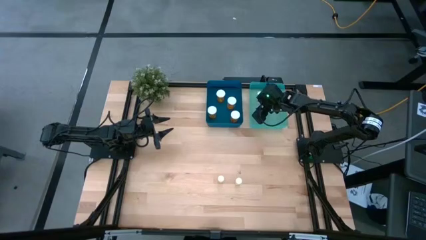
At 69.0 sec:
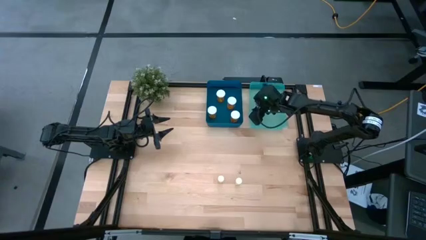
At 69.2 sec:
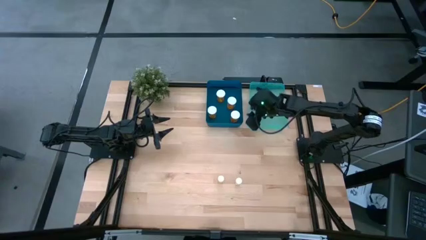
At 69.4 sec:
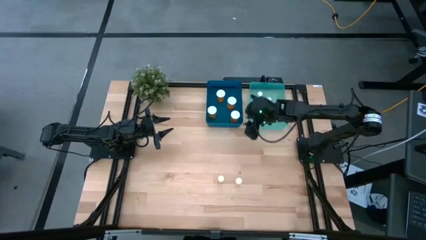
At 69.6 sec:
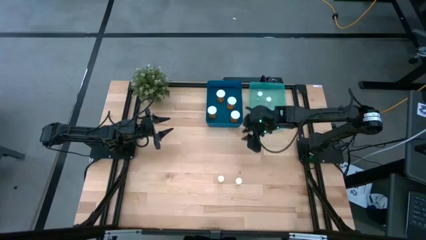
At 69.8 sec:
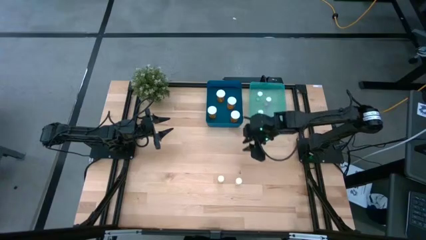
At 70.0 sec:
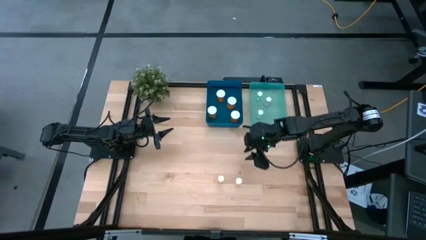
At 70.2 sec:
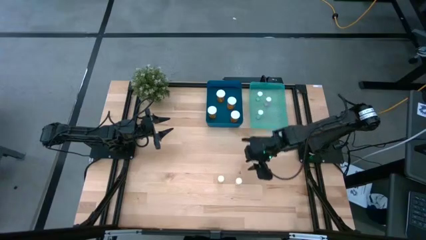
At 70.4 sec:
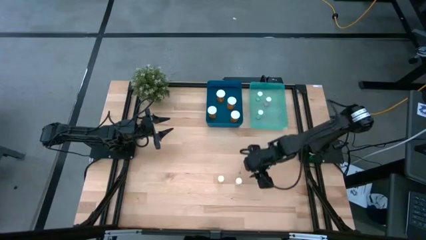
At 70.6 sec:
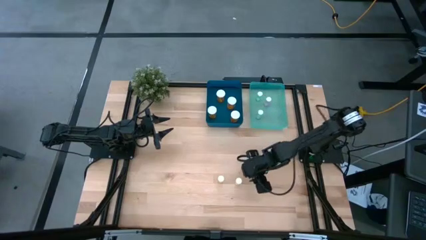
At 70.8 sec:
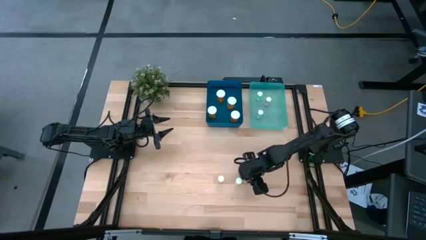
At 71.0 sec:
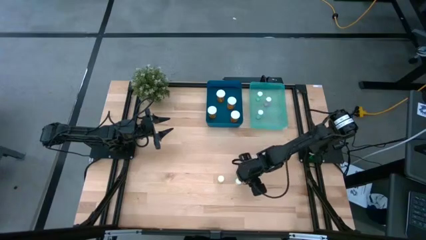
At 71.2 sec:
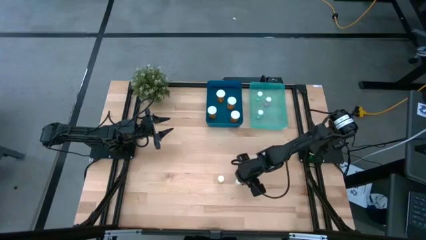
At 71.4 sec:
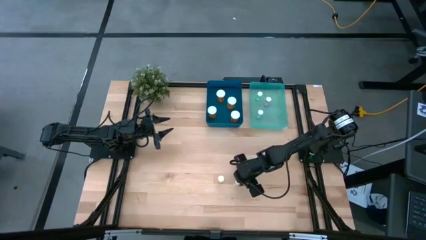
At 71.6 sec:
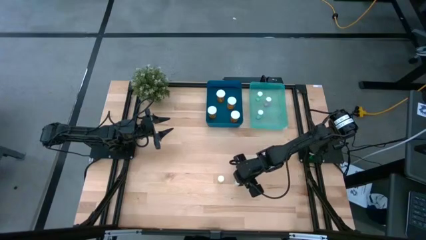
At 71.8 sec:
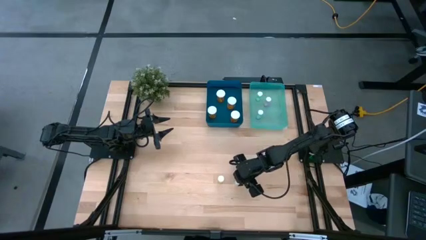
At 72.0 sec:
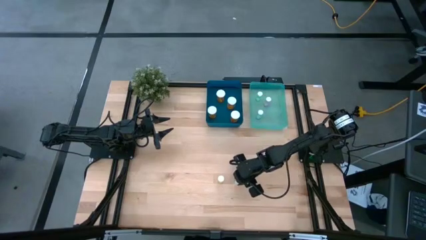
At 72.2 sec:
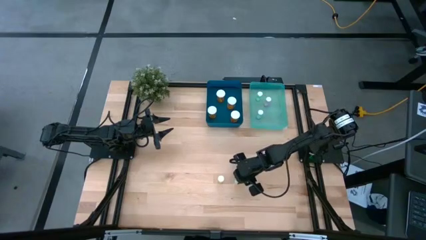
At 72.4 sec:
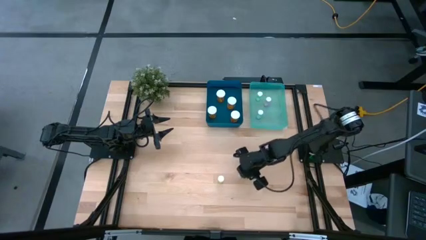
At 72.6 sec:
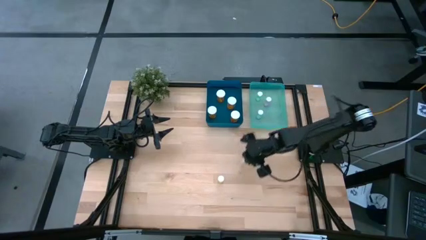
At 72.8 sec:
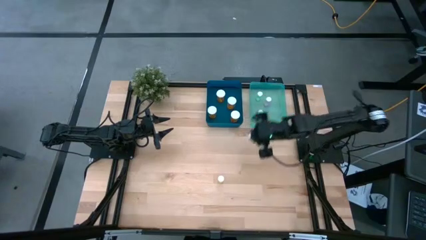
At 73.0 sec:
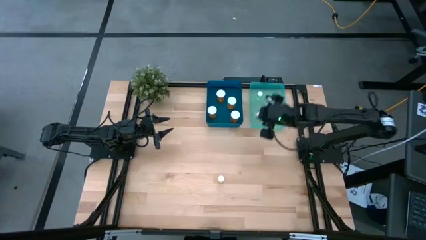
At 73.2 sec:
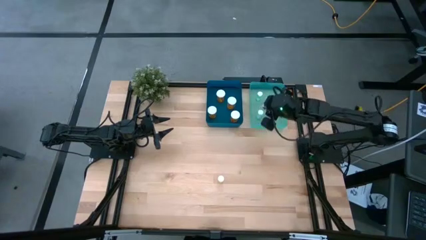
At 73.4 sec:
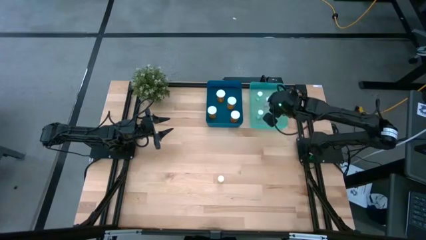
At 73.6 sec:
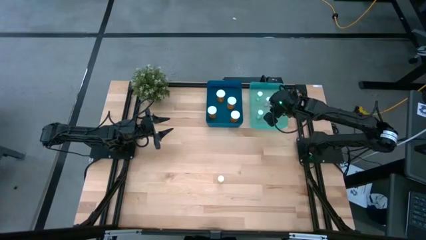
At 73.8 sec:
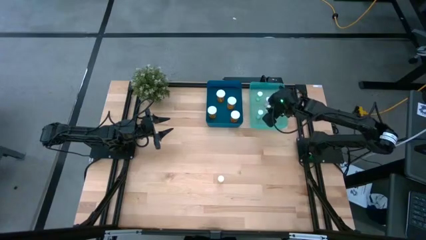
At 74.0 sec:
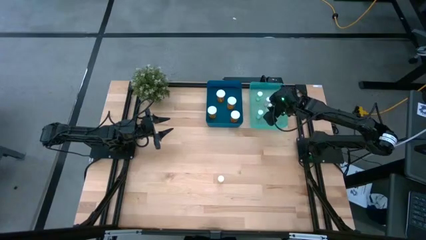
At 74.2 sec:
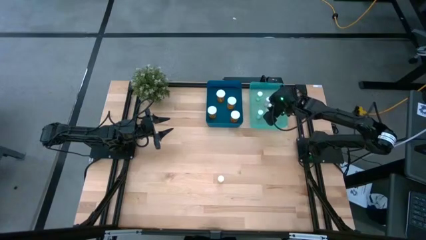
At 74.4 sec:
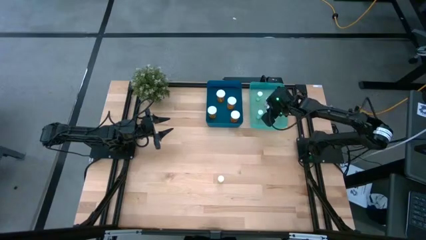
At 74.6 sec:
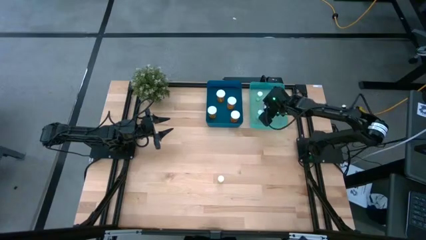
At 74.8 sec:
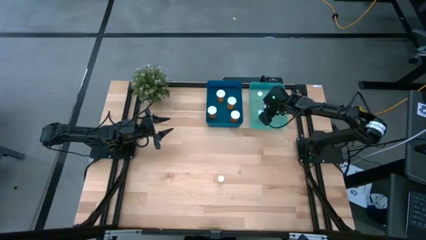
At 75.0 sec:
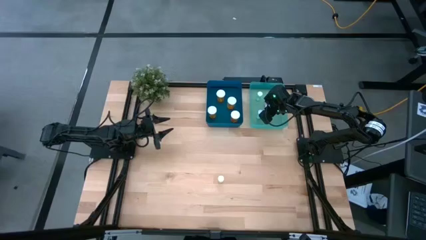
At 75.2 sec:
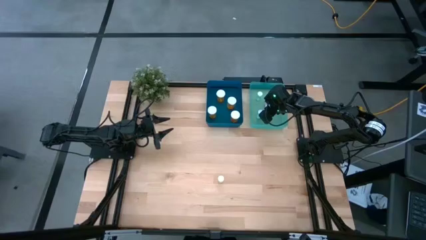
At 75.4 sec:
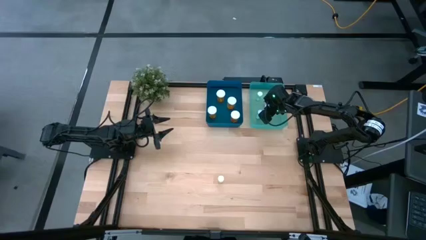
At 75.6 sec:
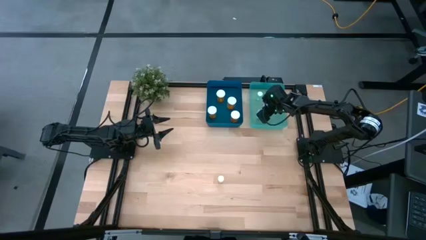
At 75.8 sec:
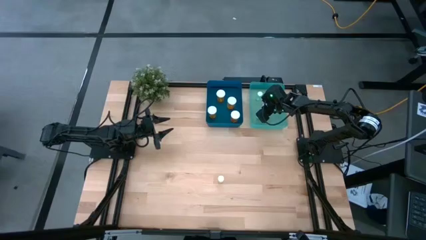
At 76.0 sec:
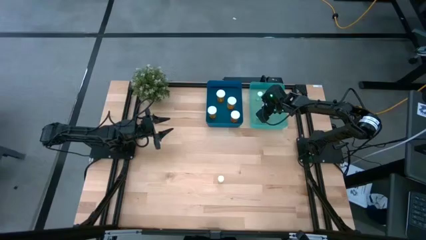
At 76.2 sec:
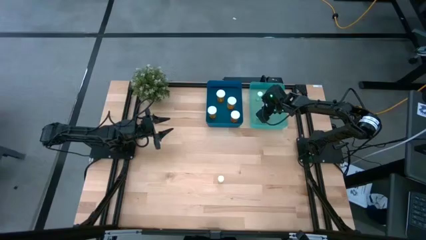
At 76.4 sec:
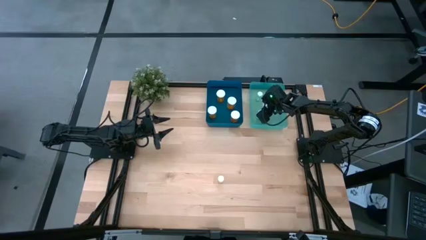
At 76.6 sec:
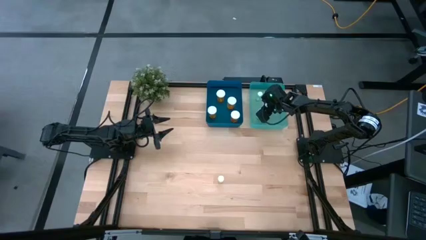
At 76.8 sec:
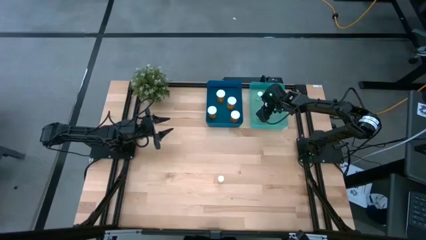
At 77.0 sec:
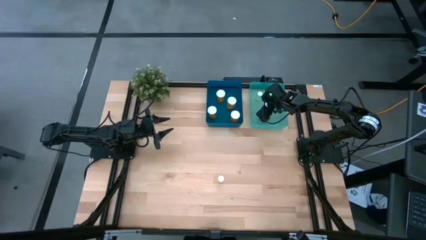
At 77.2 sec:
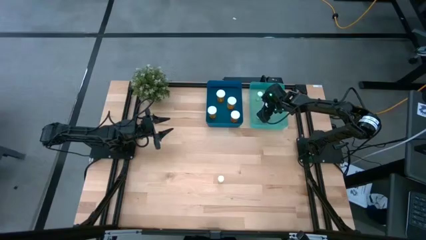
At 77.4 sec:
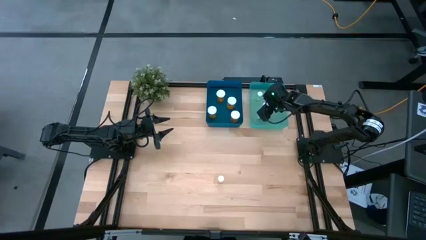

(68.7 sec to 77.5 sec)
Task: Pick and place medicine bottles into bin by pill shape (circle, oval)
Put the small yellow medicine bottle into the green bin

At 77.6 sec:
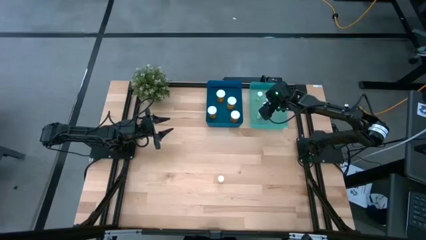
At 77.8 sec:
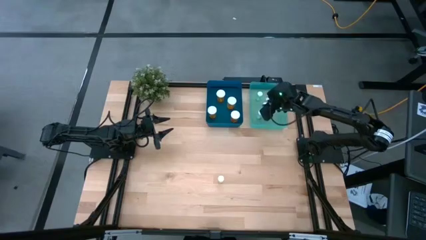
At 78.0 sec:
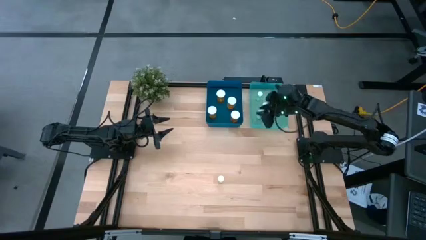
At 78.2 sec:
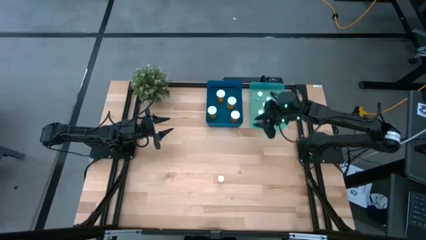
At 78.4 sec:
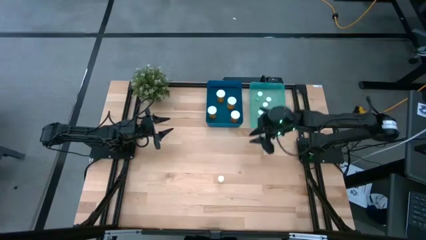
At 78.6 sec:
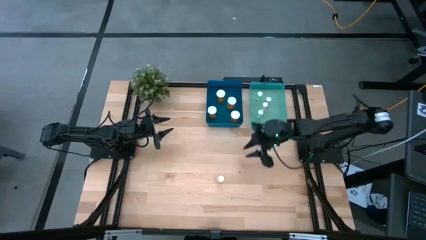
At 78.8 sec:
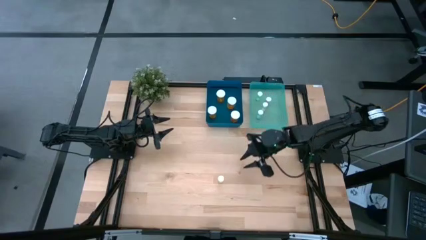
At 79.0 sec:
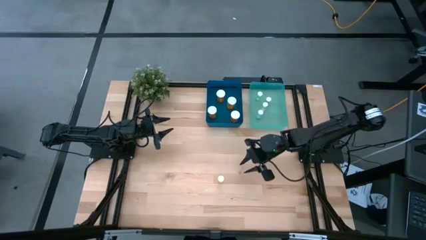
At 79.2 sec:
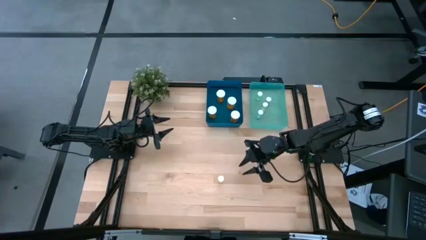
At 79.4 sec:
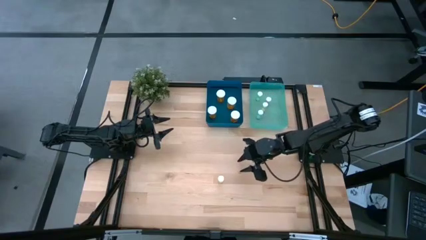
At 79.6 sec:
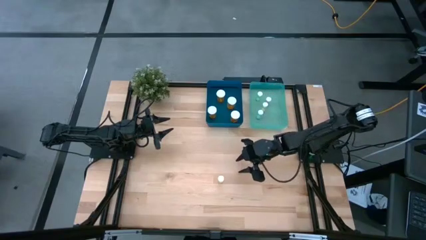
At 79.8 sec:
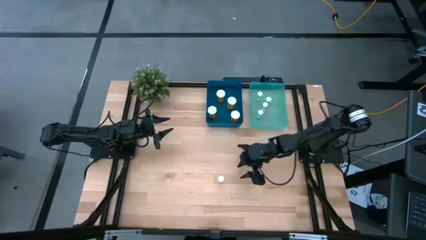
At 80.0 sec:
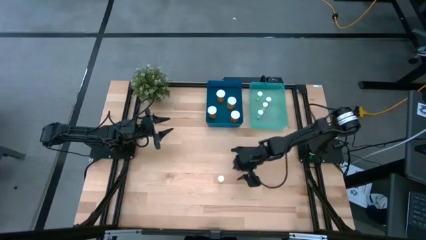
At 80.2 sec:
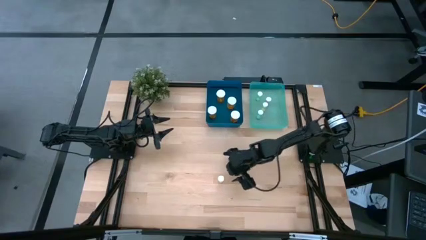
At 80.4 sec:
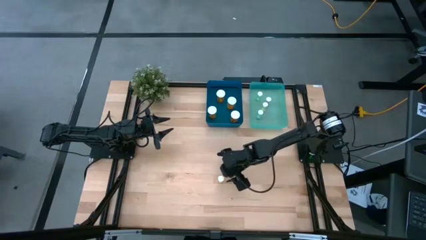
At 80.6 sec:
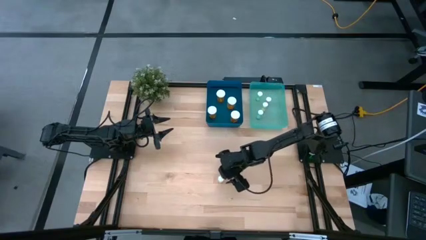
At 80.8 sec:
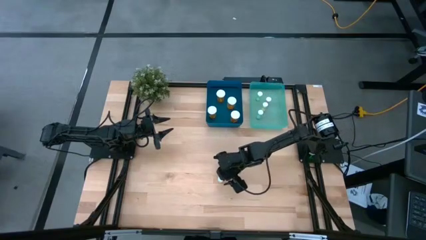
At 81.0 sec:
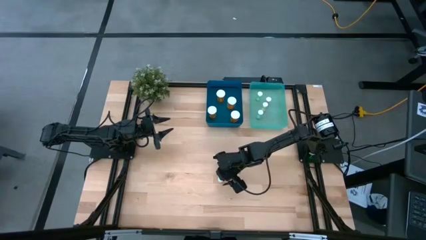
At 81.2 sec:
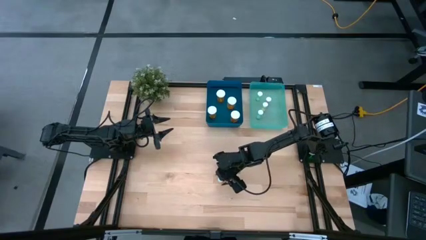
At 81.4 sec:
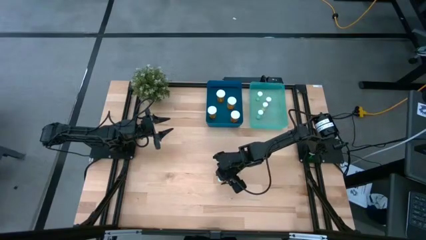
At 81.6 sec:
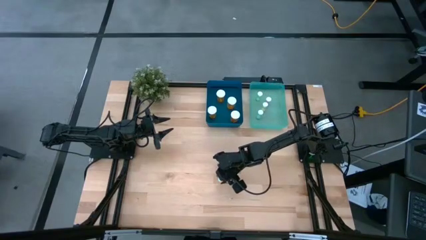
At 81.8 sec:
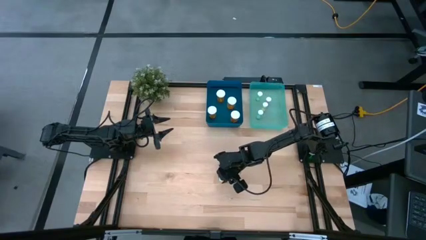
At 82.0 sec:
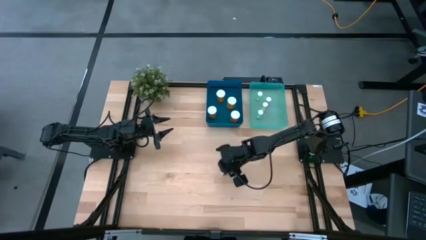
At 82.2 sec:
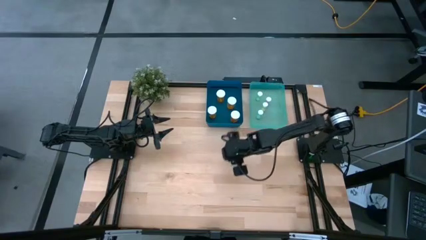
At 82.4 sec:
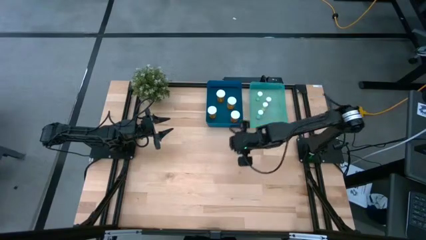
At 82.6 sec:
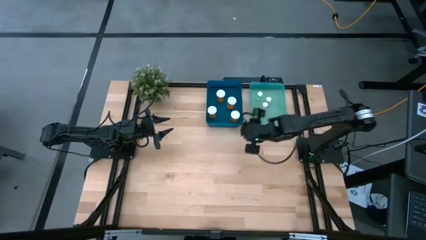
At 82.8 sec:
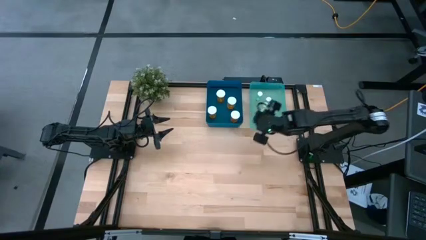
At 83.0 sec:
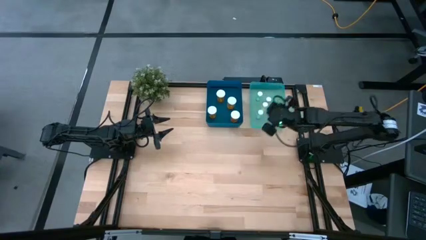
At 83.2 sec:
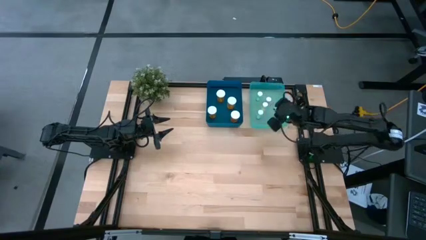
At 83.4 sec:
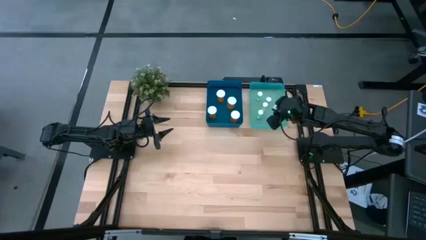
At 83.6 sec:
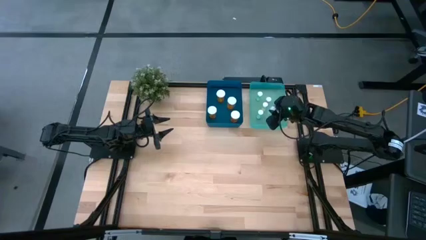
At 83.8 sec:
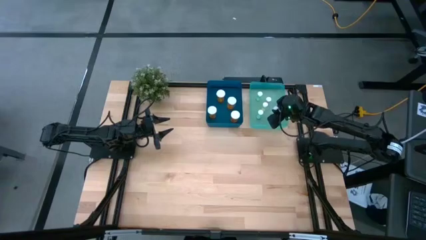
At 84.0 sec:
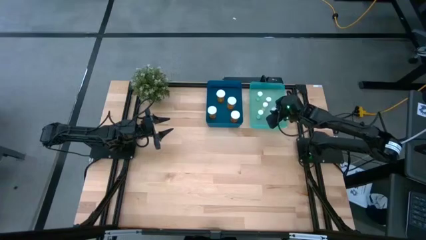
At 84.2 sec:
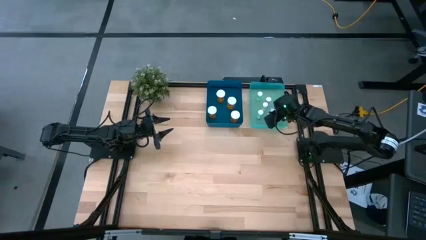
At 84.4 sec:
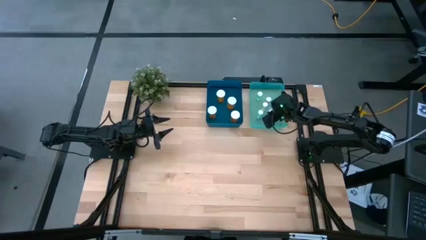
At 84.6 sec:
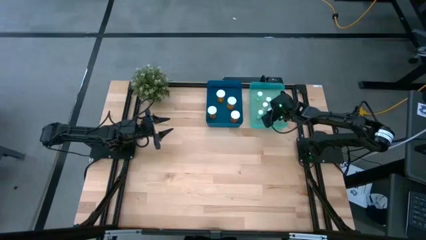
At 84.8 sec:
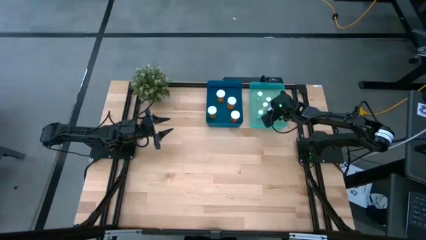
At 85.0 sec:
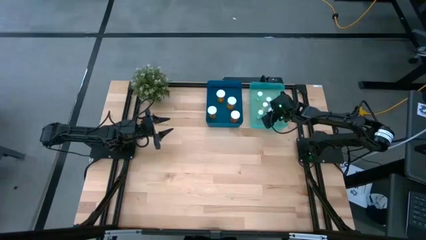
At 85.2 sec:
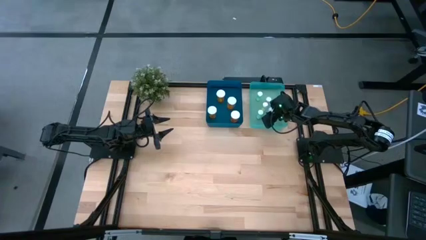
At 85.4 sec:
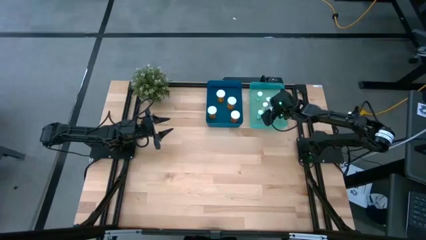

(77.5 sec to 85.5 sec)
Put the small yellow medicine bottle into the green bin

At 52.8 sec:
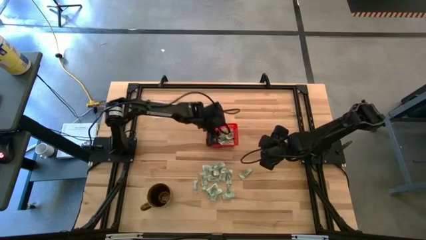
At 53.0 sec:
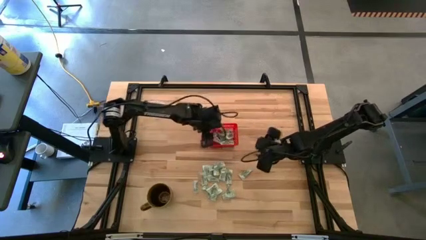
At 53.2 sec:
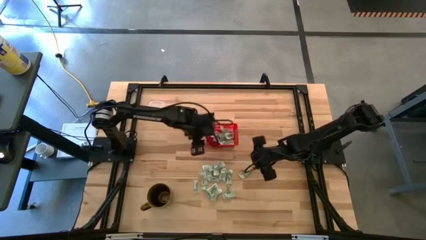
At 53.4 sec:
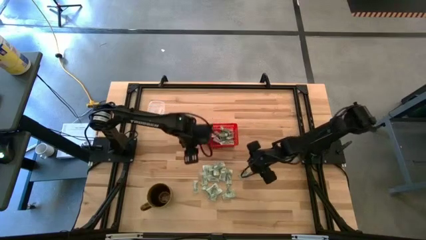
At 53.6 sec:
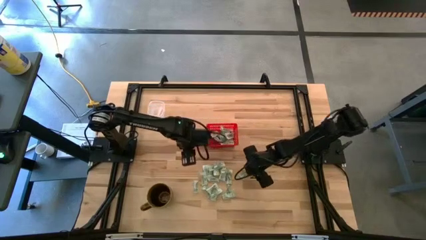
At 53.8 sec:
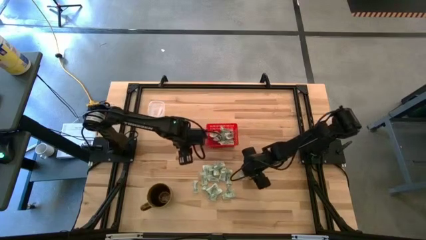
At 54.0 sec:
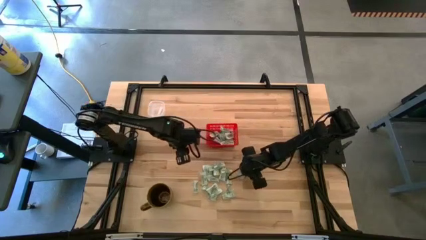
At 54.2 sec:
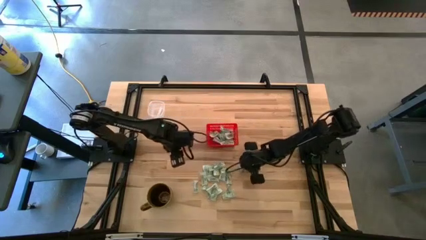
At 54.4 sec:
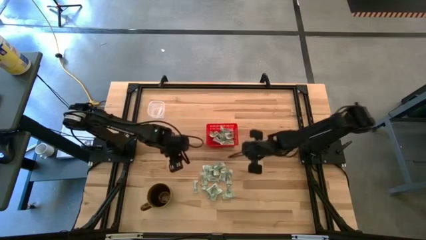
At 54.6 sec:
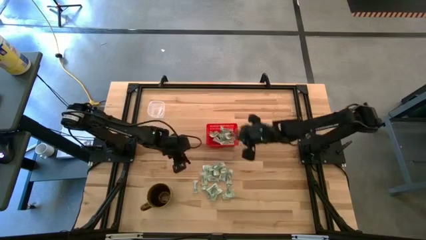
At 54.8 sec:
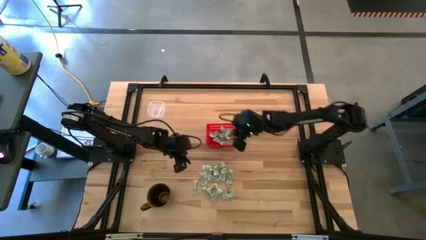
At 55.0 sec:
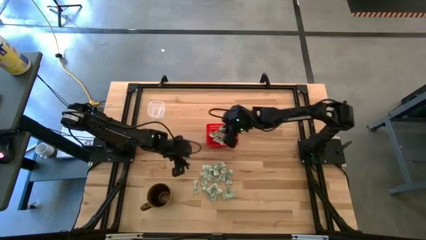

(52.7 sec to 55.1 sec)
Task: Pick and place items into bin
Put the green stevia packet into the red bin
